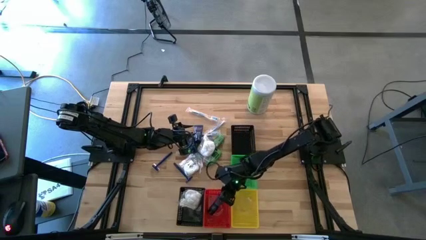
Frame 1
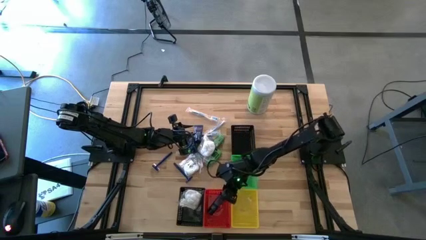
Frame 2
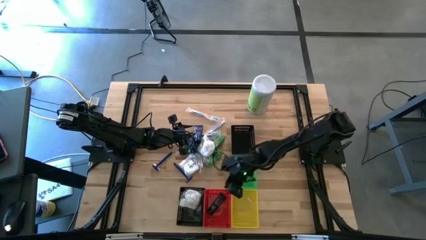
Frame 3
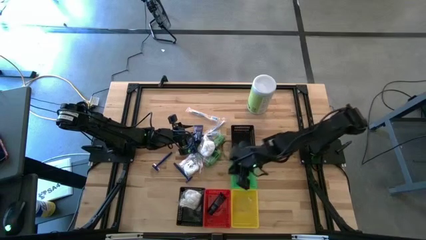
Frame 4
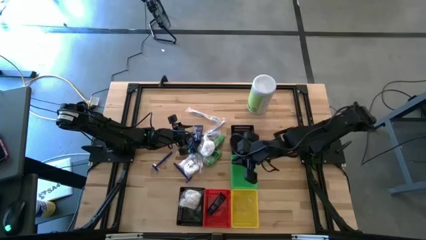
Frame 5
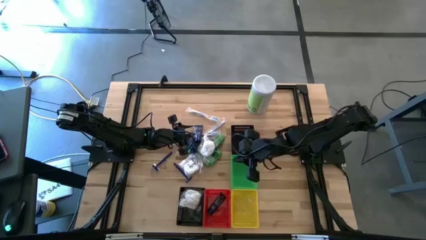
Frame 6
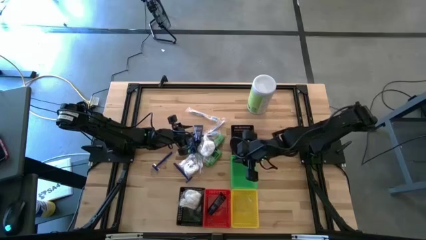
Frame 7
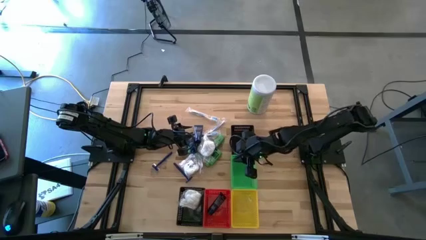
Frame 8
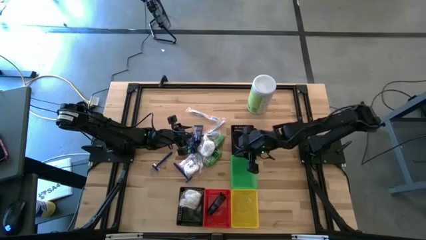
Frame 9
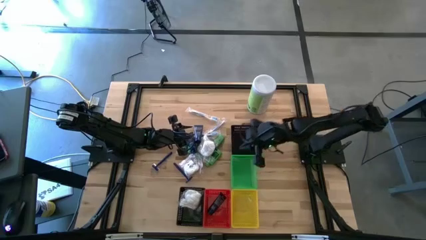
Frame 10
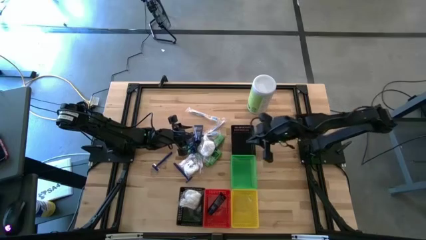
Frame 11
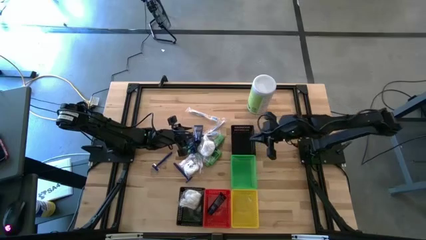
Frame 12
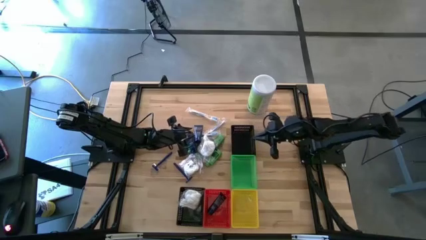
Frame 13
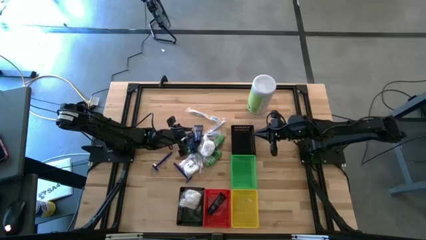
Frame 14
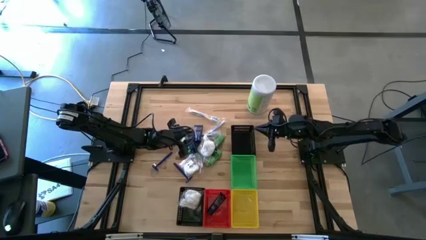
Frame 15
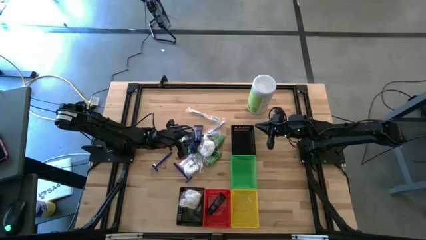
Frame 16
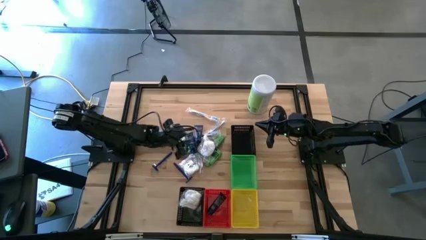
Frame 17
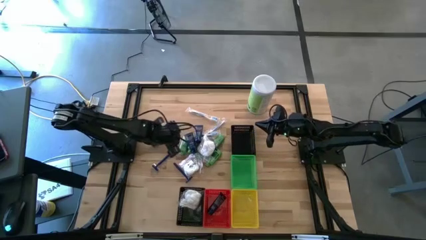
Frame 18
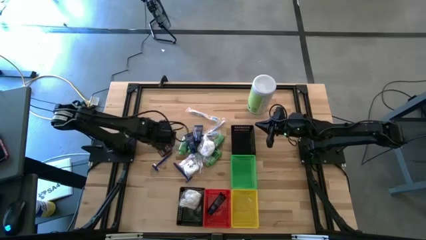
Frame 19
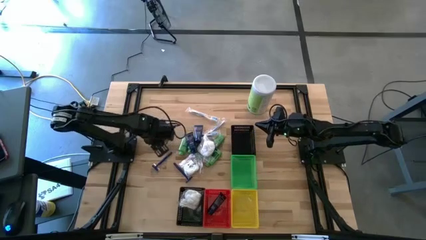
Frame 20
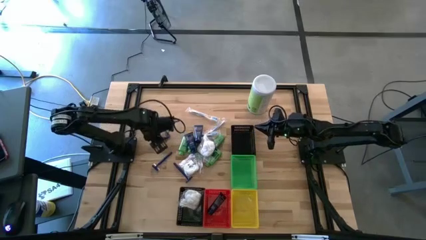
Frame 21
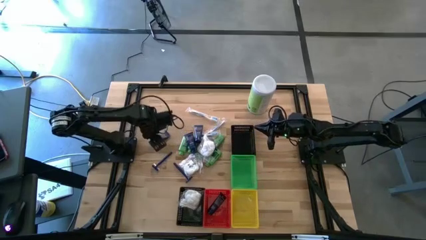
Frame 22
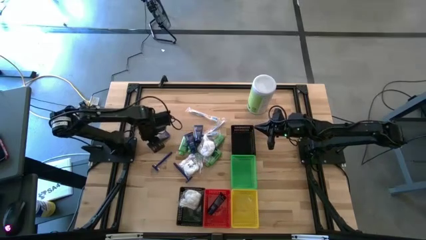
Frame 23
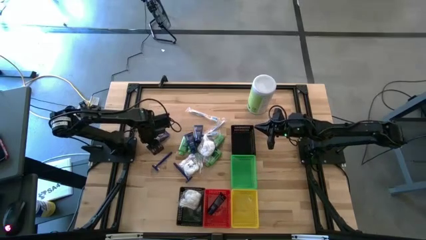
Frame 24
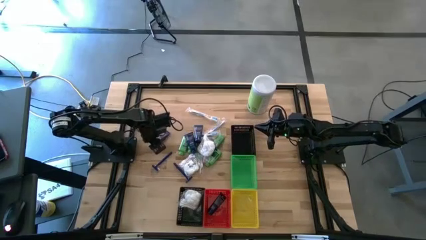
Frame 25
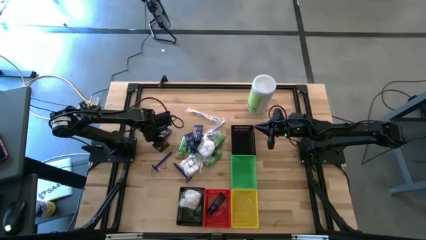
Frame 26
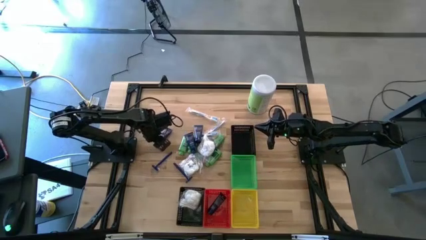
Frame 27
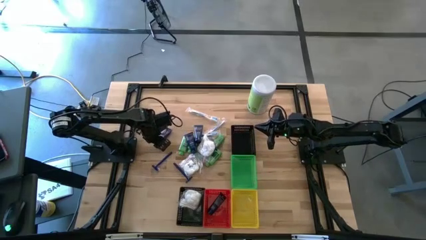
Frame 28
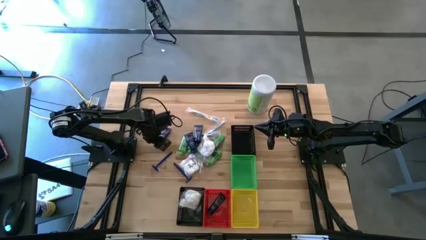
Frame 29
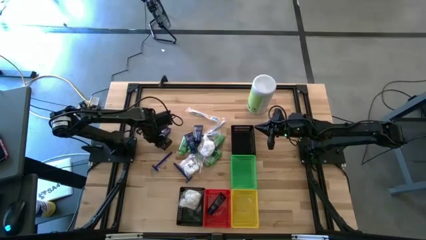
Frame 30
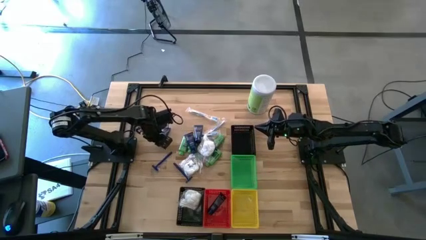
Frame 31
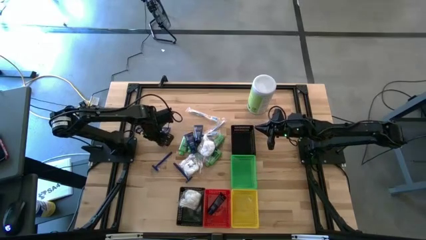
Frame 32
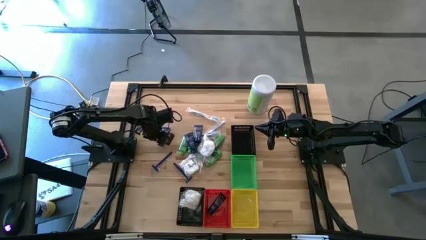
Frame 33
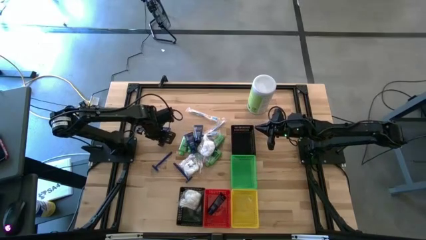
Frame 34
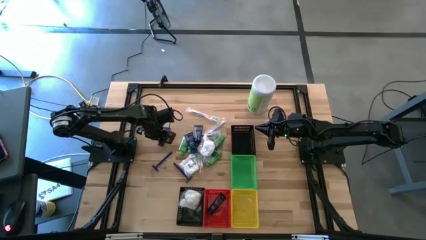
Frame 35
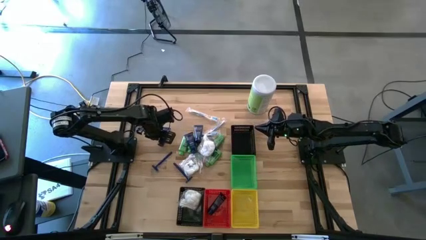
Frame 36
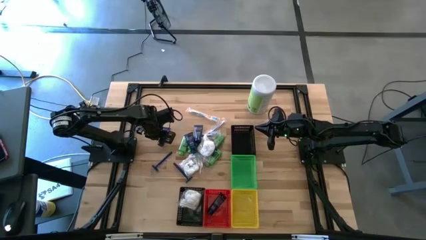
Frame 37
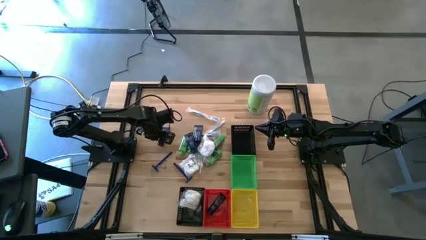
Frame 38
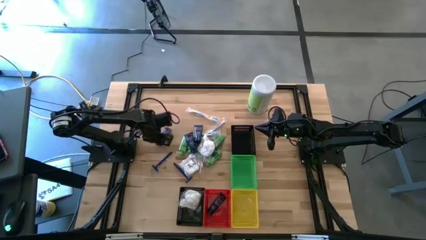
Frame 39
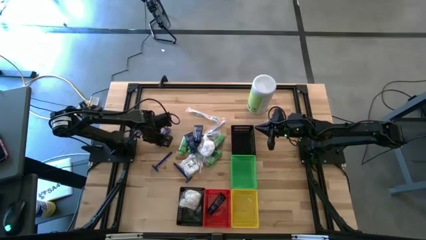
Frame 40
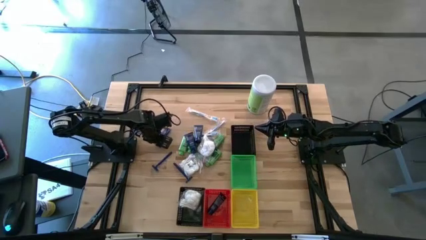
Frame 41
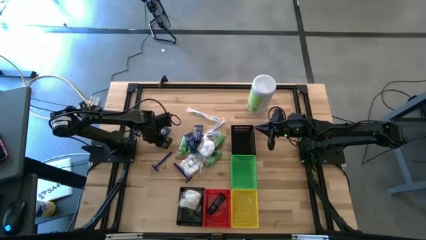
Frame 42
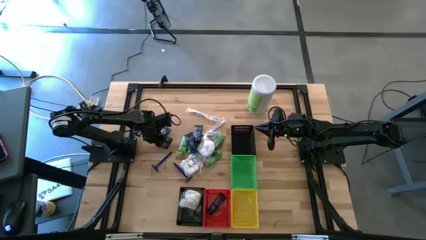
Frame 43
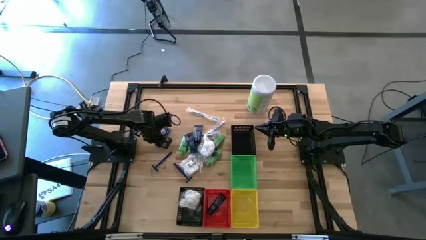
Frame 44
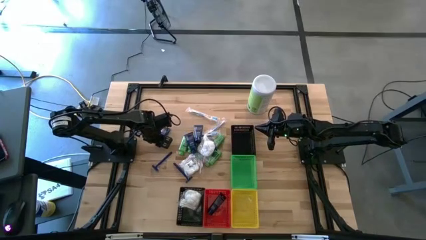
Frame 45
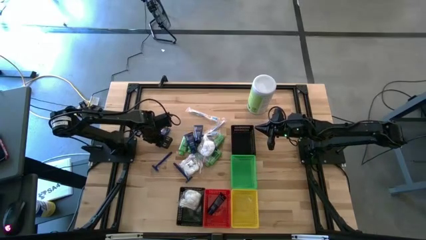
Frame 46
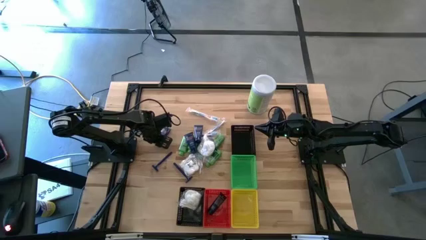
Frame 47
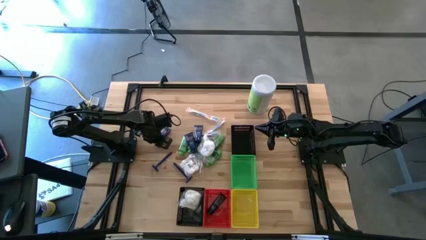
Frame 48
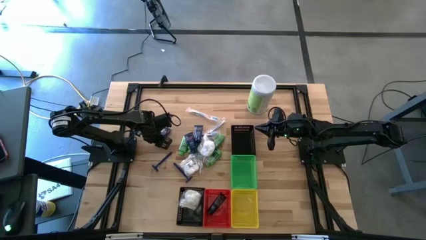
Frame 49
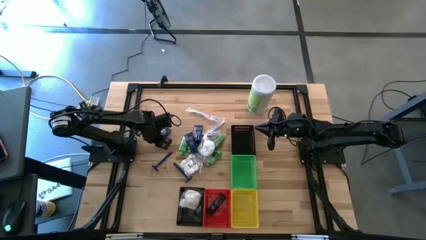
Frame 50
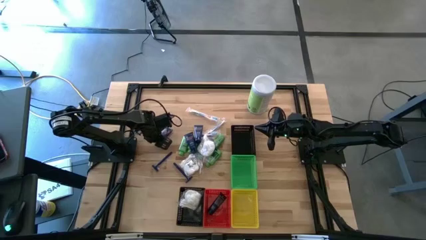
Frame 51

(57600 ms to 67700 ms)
Task: Pick & Place Travel size toiletries
Put the blue shave cream into the red bin

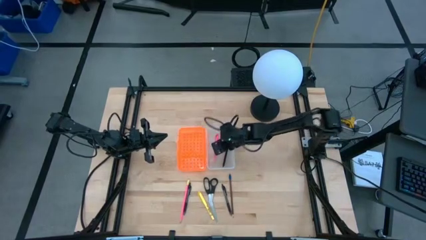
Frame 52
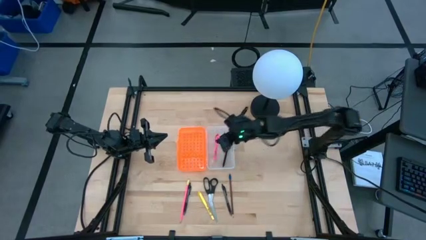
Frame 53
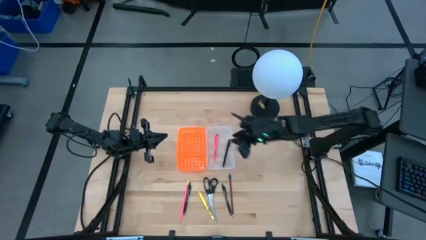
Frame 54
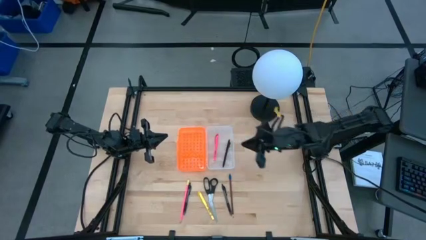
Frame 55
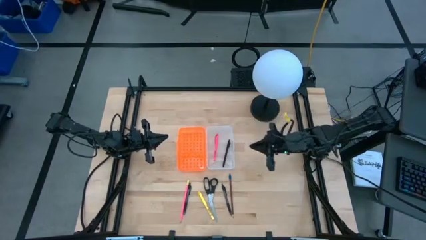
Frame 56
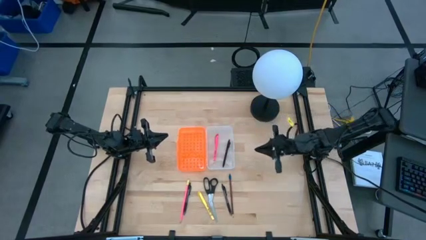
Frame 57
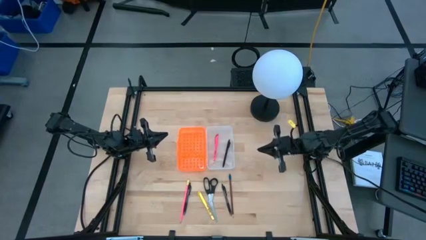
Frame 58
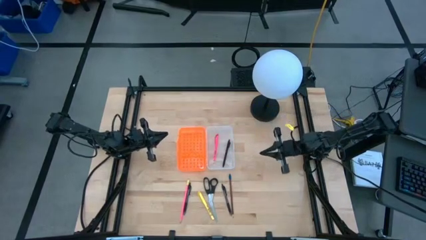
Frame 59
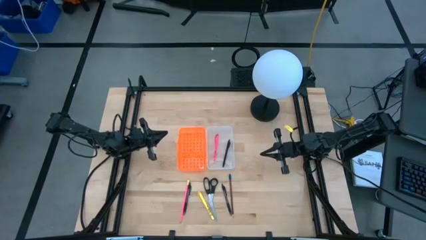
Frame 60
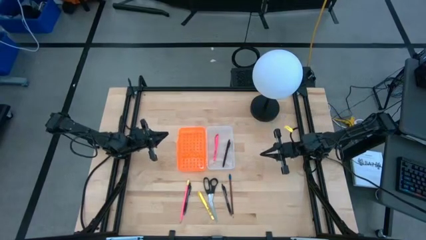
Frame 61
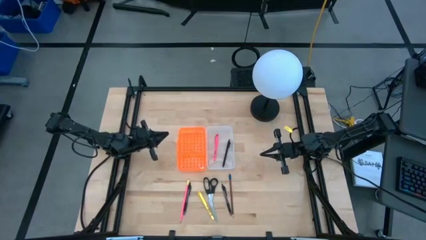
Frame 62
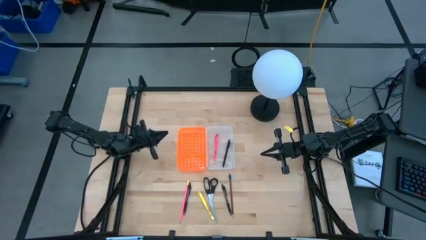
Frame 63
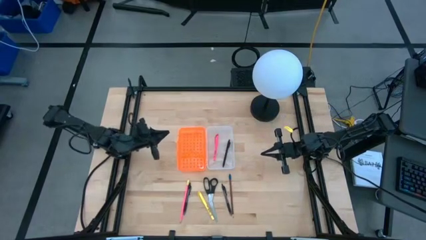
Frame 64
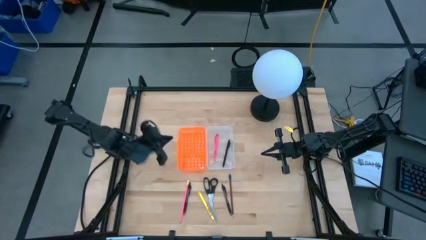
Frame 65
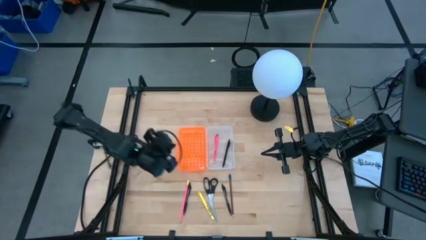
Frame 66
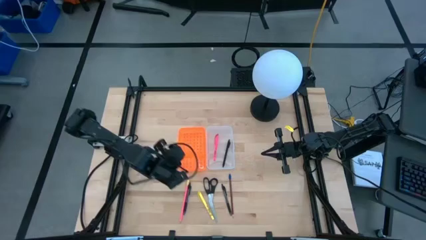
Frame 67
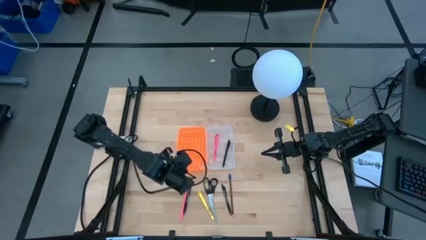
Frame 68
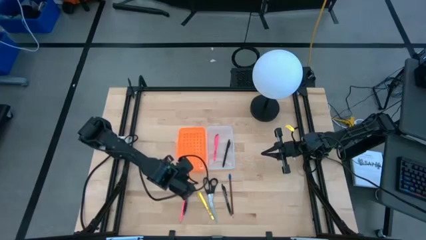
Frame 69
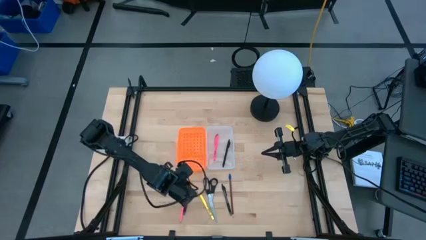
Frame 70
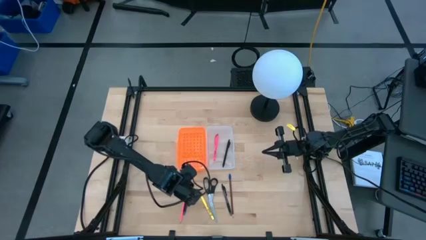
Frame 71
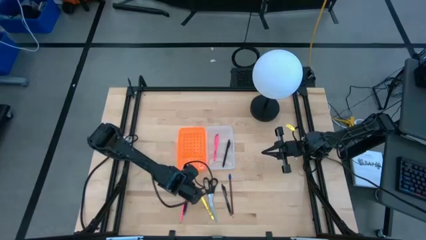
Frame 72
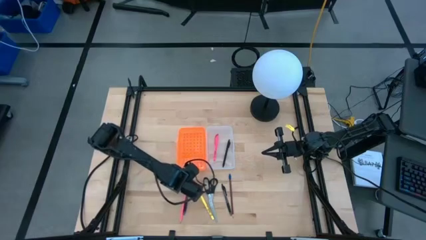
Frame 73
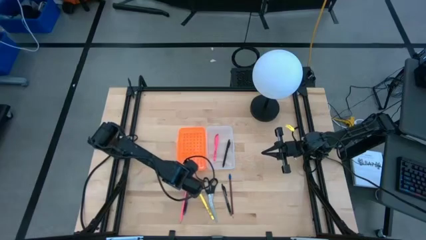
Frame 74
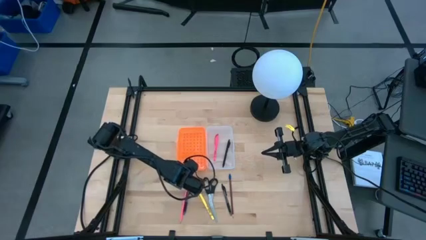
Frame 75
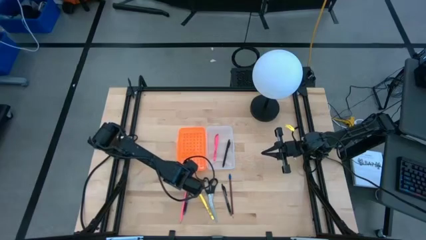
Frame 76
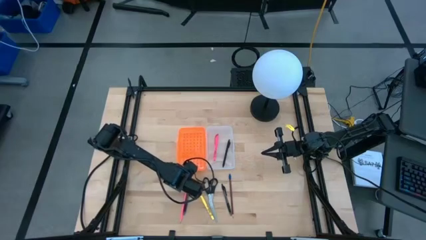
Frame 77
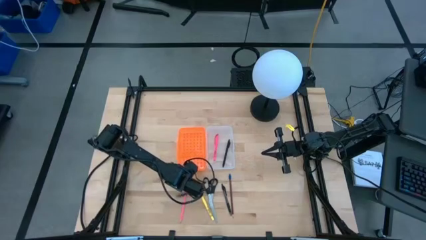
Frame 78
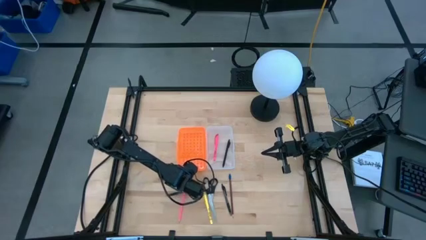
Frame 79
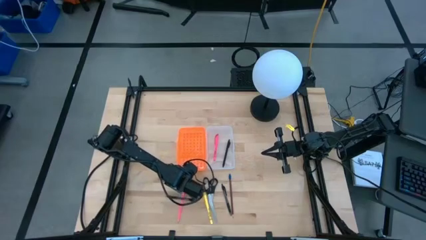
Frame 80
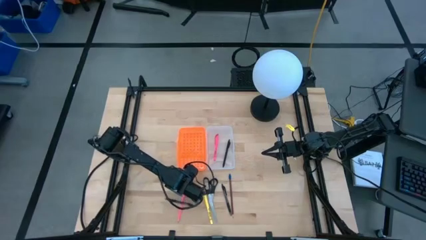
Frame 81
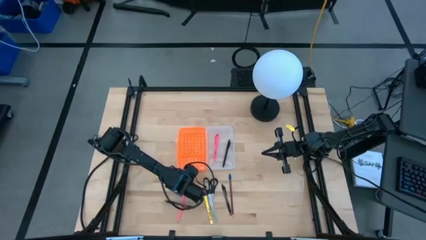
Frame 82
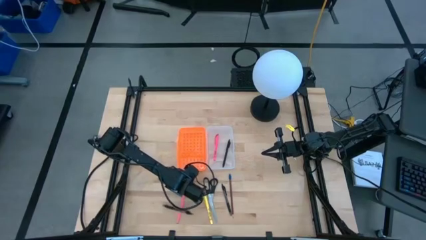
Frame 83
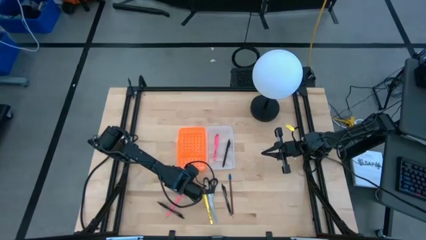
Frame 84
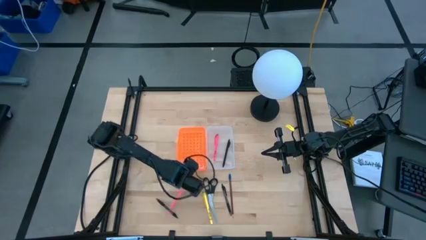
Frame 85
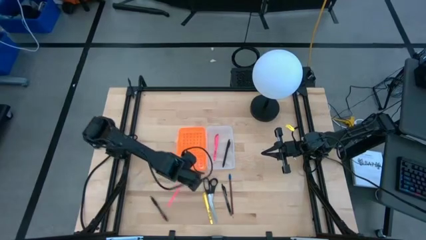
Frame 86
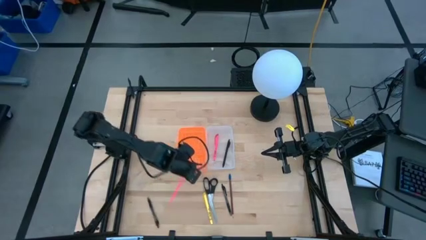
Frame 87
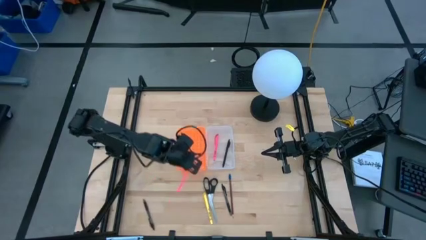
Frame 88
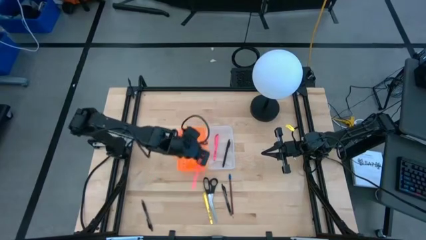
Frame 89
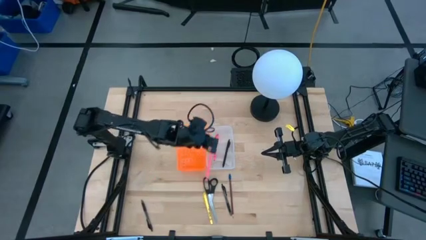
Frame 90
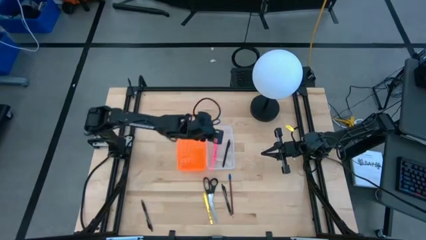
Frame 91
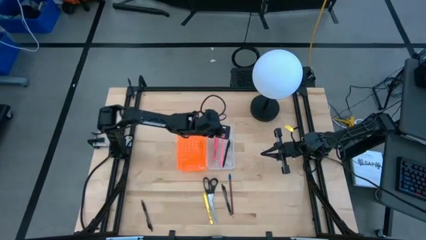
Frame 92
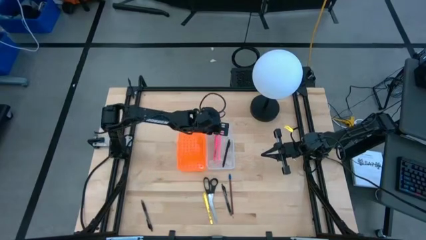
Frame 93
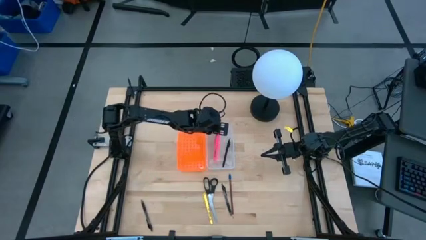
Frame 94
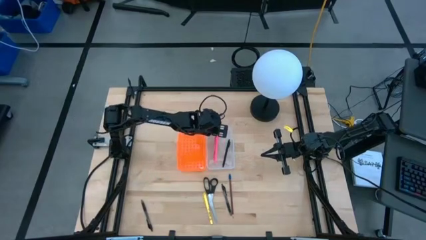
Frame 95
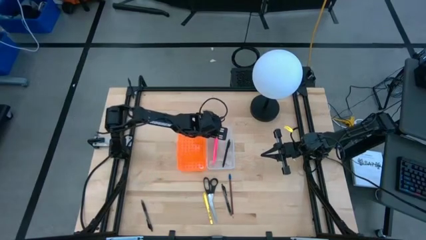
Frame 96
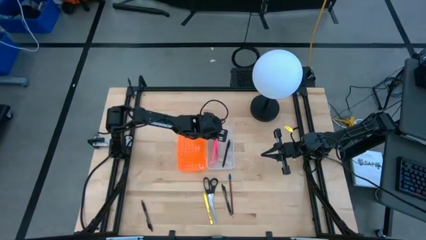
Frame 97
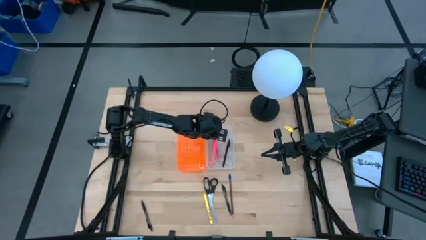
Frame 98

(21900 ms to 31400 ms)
Task: Pick & place school supplies into a supply box
Put the pink pencil into the supply box
